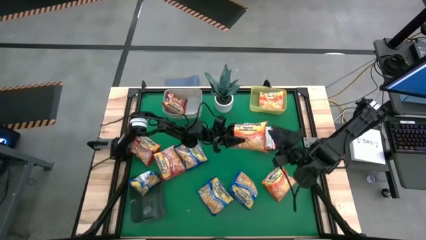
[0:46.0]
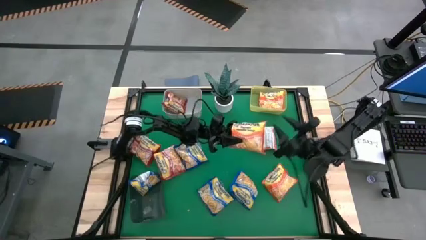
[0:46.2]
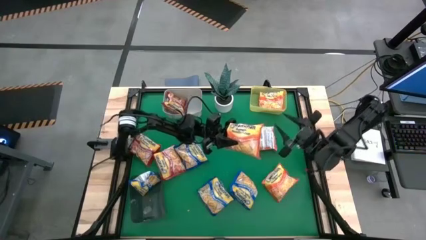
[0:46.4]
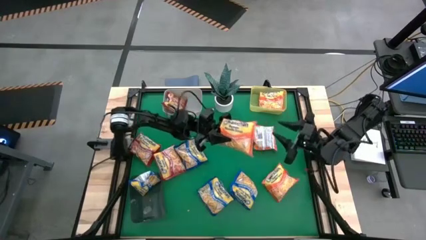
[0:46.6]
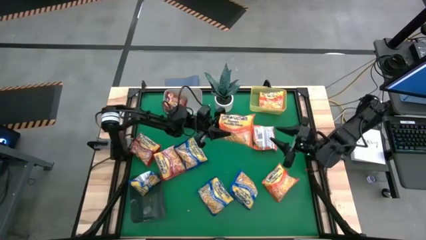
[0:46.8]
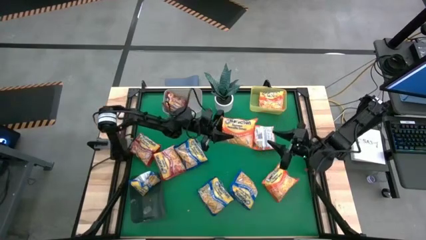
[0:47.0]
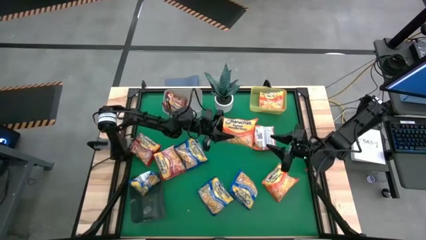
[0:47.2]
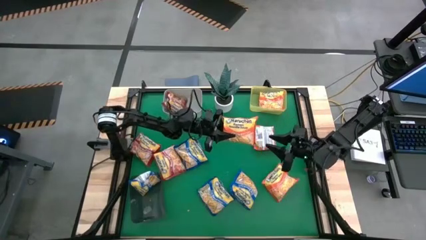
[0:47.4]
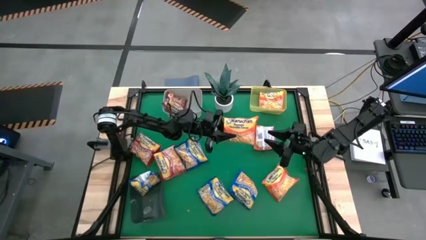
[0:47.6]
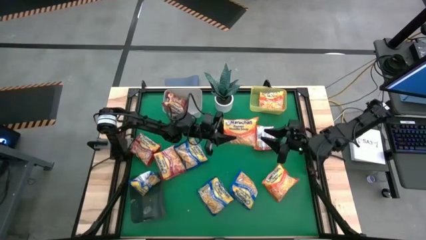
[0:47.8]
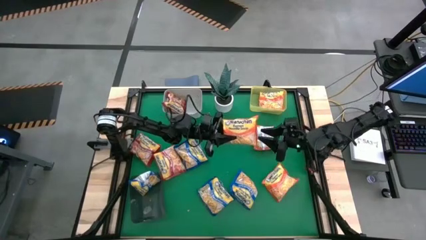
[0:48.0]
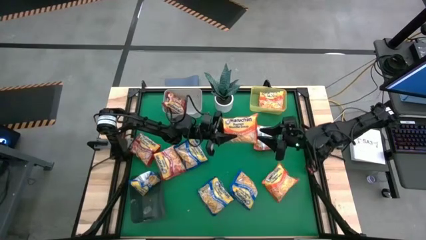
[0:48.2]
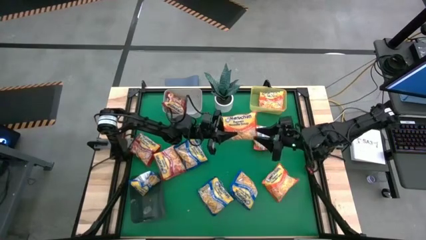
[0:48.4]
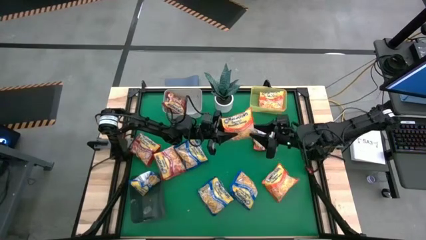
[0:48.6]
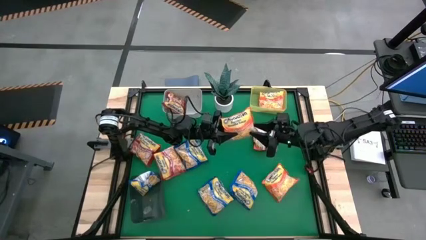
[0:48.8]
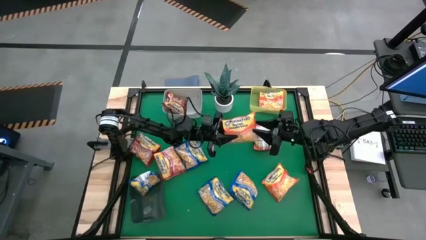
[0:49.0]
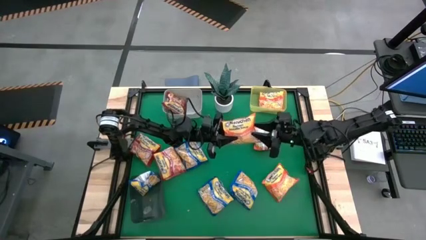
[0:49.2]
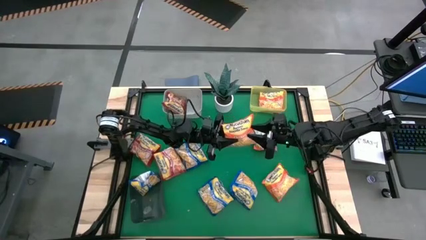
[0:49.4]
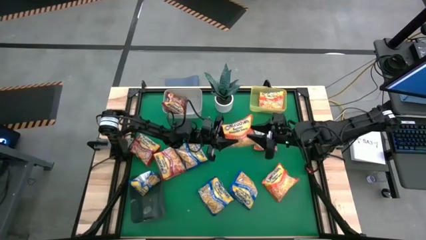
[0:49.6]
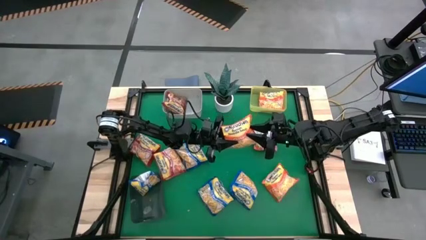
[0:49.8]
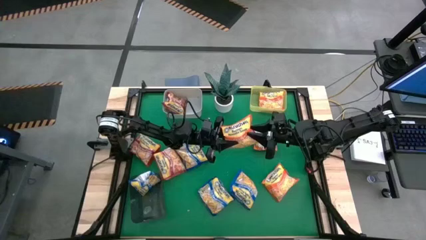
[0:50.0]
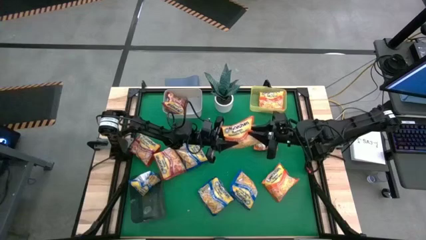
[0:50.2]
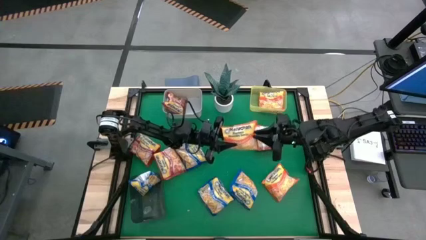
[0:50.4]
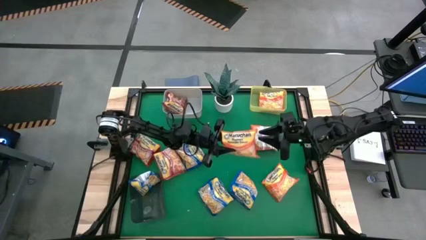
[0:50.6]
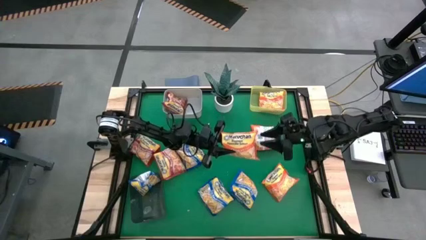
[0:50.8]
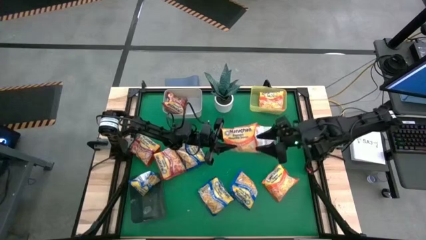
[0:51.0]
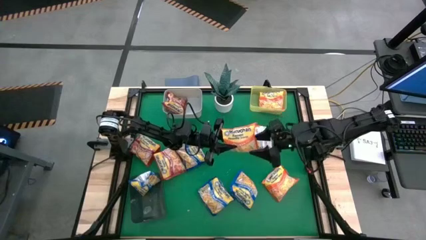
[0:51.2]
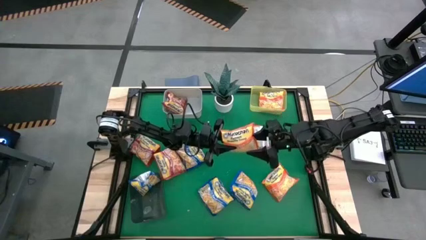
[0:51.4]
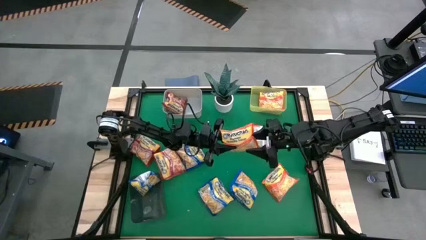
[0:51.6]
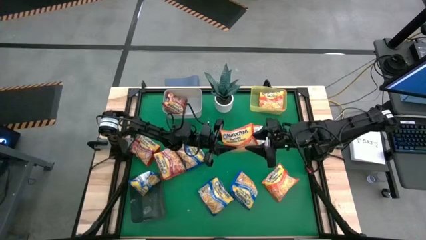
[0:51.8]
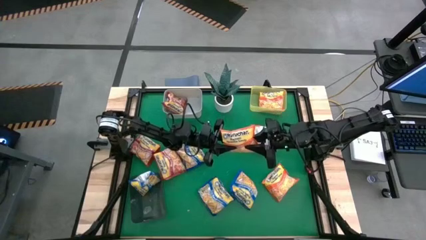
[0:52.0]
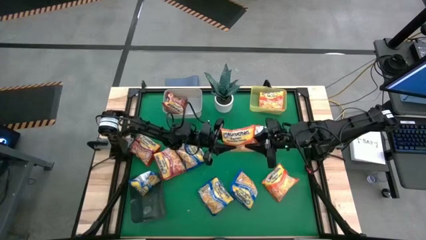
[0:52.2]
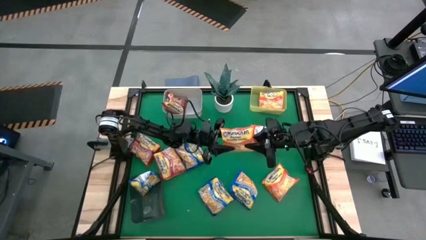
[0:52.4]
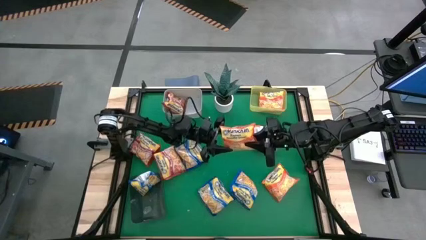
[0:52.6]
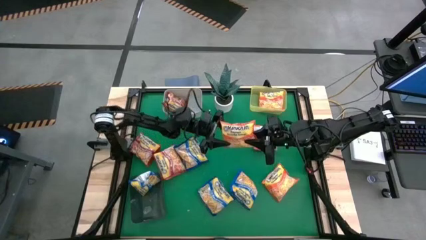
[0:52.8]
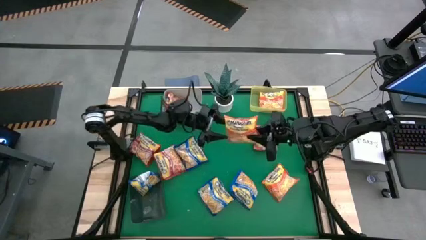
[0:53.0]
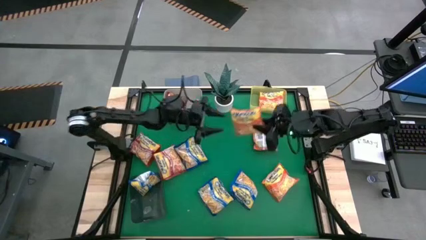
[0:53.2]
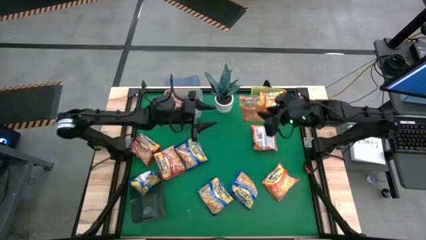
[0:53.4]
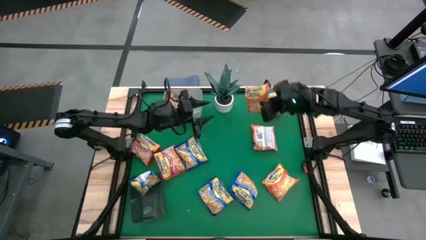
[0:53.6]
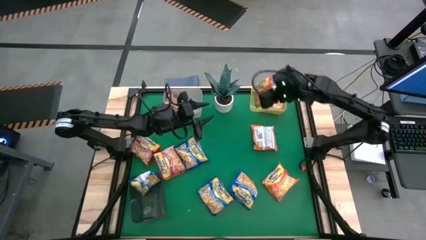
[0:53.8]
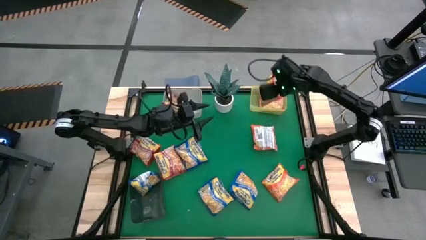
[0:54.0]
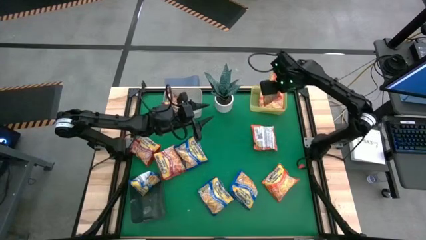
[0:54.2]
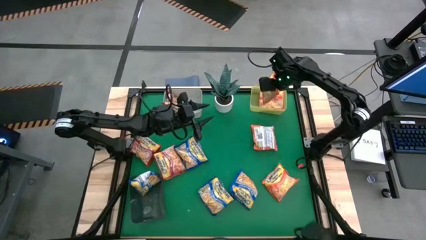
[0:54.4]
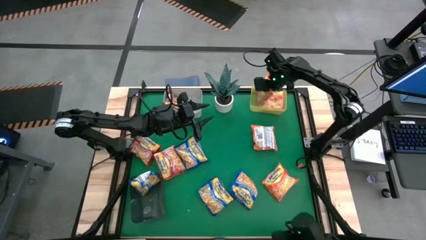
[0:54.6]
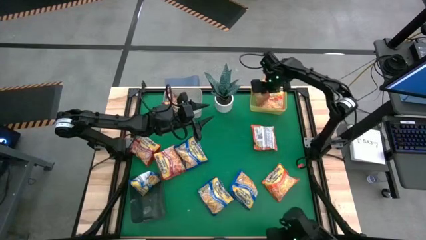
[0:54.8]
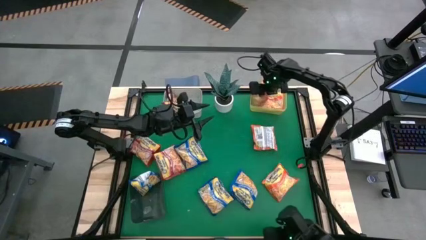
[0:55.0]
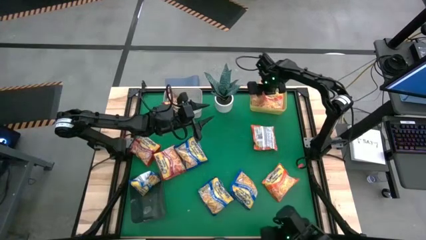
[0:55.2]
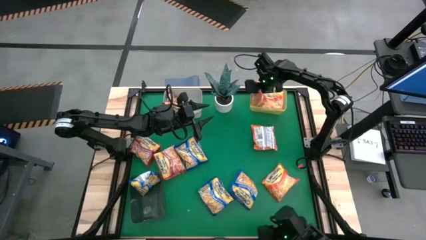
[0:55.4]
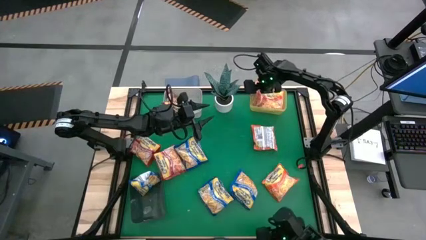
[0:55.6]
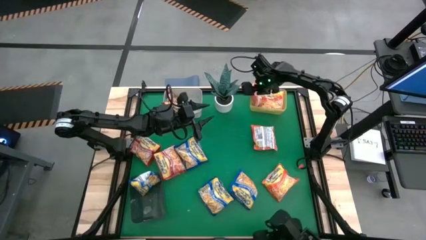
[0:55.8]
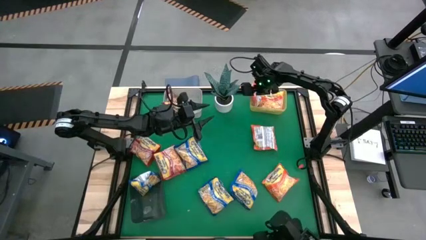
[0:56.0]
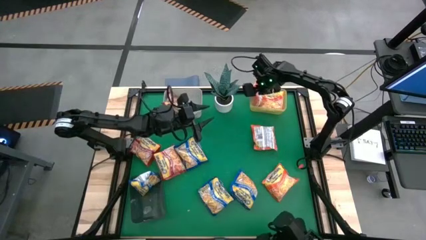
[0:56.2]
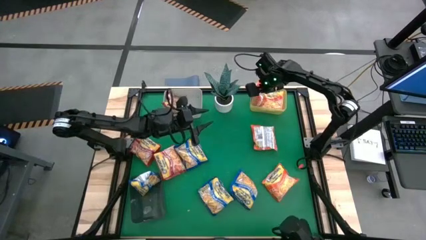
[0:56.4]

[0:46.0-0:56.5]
Task: Sort Maruchan noodles
Put the top center orange noodle pack into the yellow bin

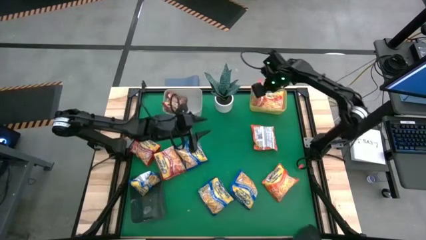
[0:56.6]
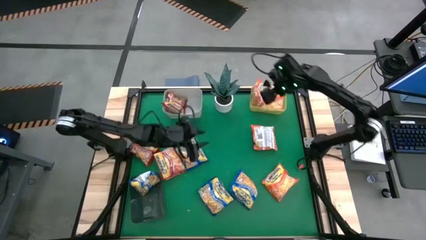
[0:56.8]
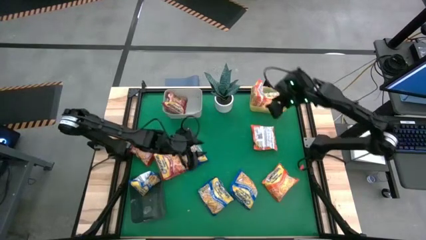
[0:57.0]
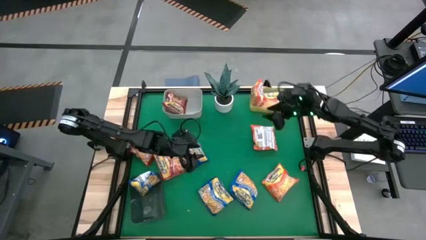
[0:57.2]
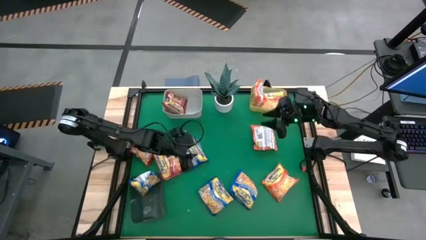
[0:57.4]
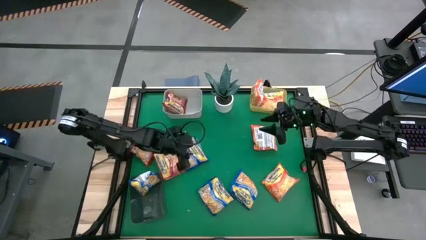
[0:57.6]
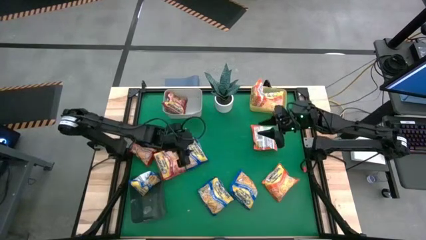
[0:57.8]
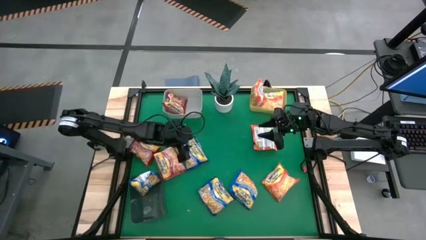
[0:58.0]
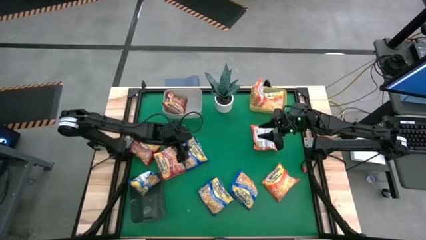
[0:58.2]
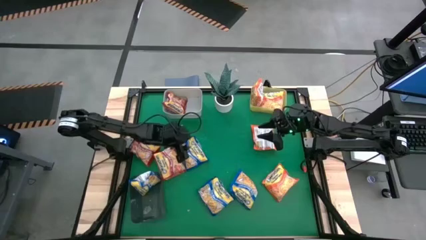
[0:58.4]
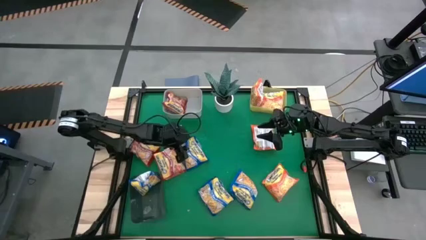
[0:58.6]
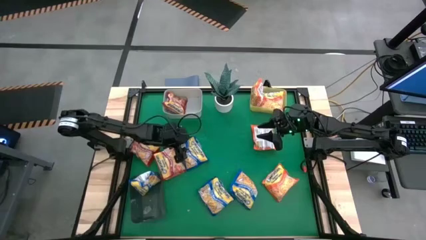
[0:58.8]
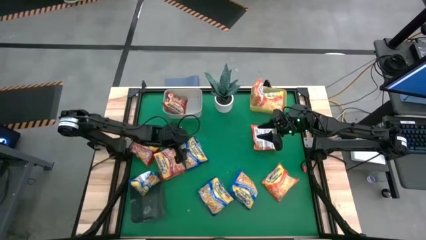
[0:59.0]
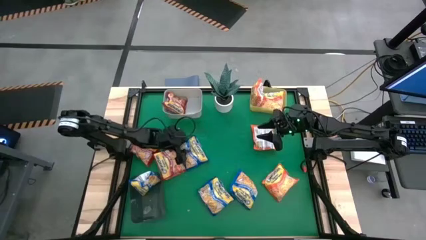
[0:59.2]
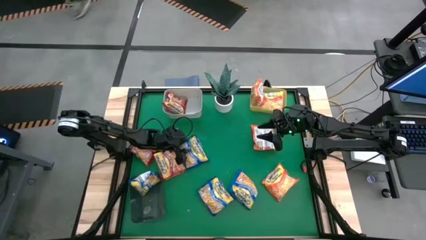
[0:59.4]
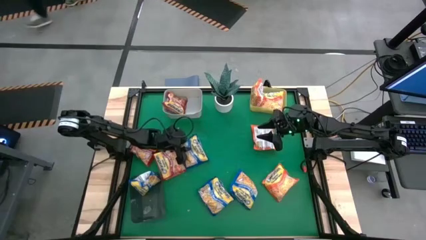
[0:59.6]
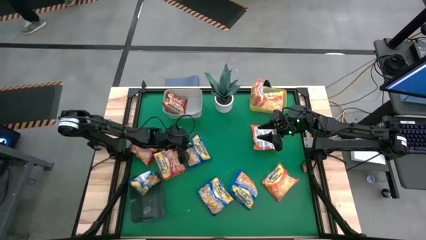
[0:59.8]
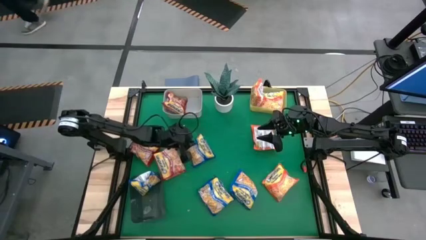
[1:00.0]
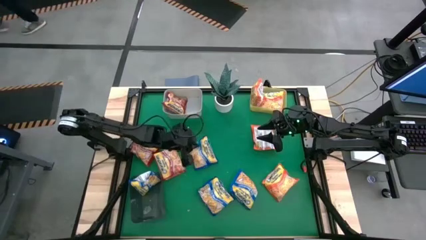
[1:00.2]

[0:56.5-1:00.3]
Put the center blue noodle pack into the black bin
